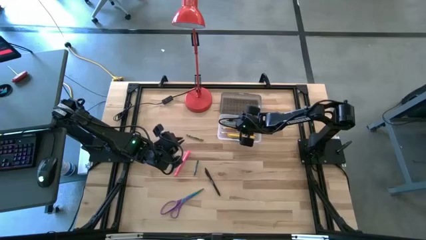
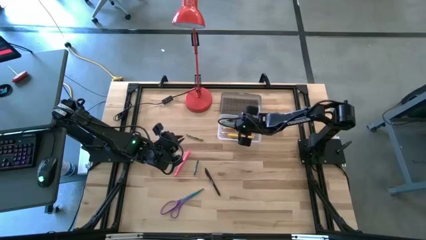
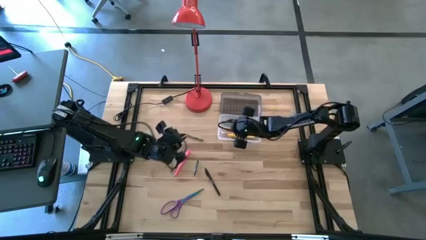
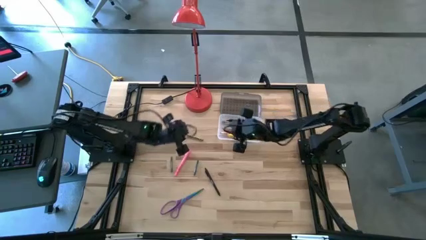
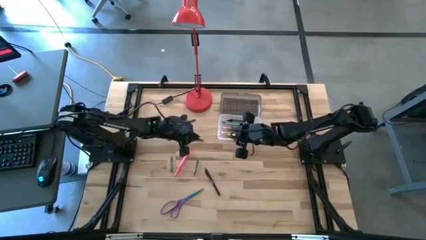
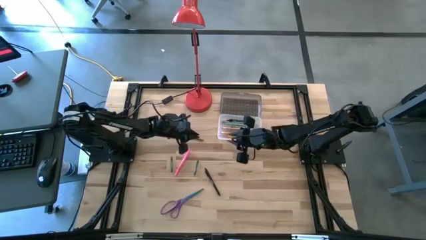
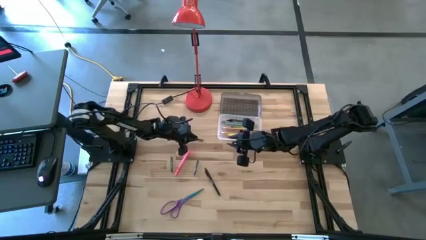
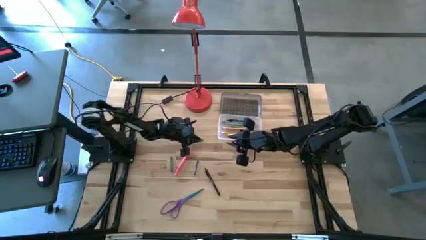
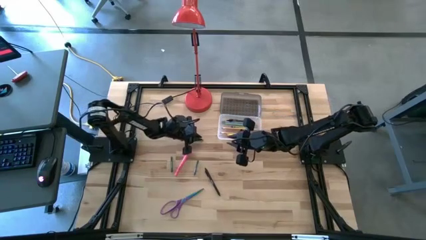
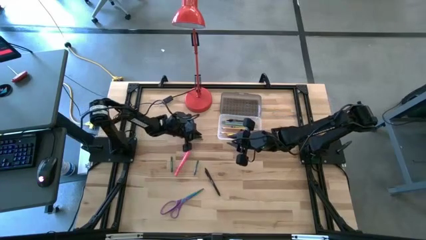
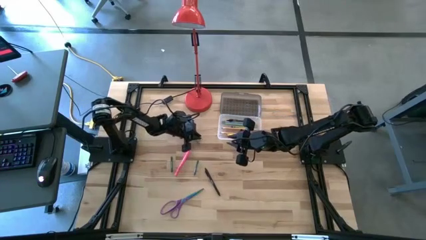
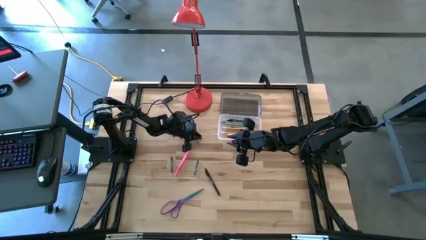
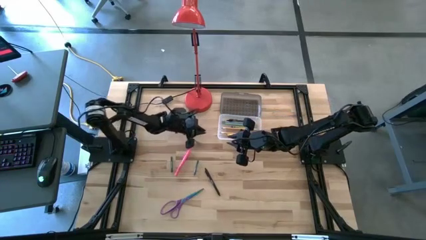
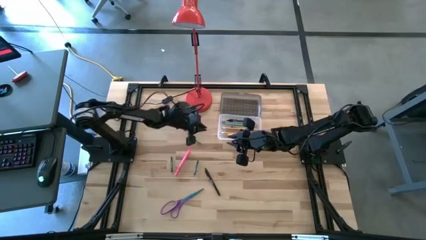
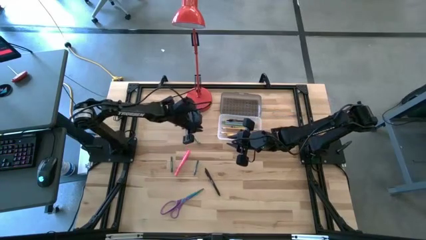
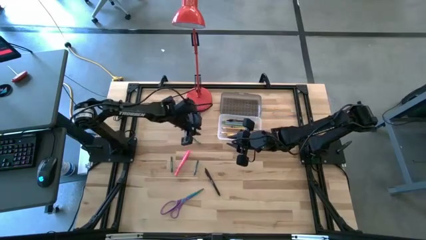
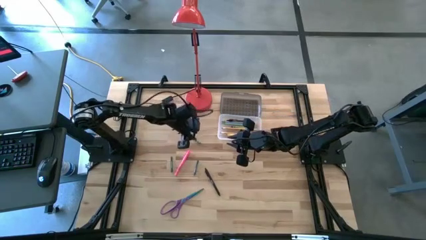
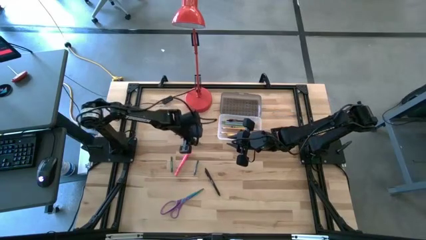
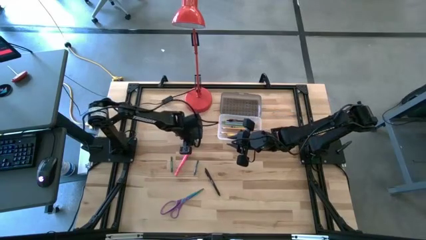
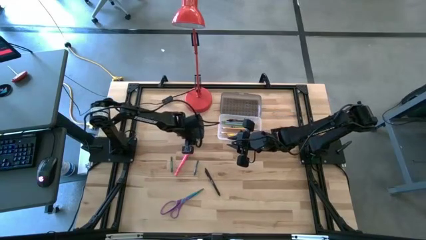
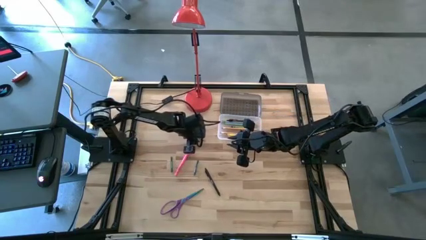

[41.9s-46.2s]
Task: Pick & place school supplies into a supply box
Put the green crayon into the black supply box

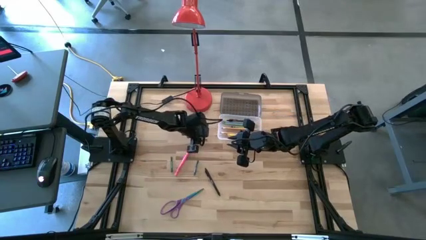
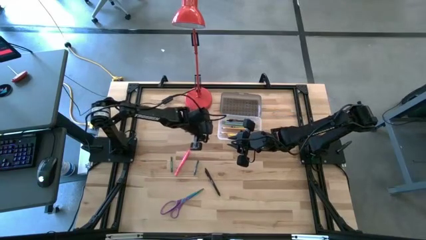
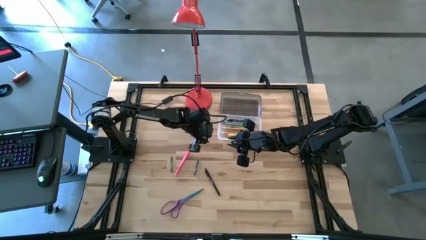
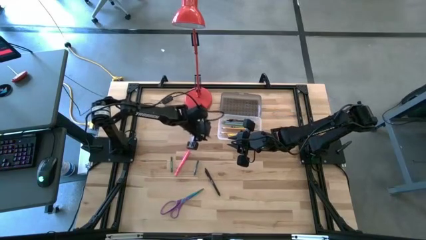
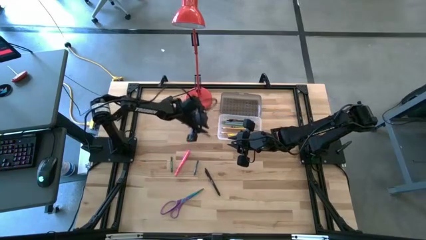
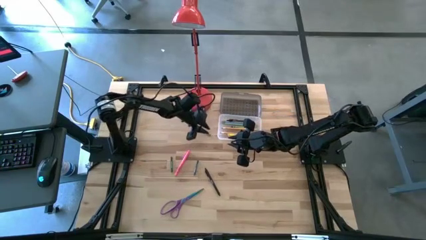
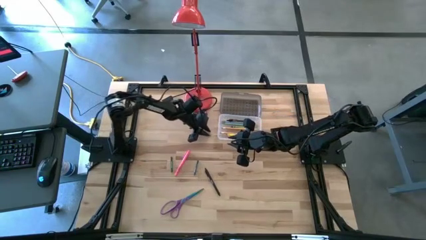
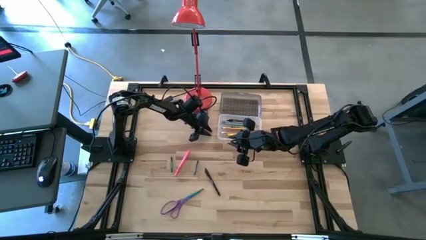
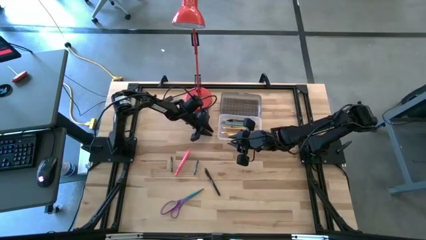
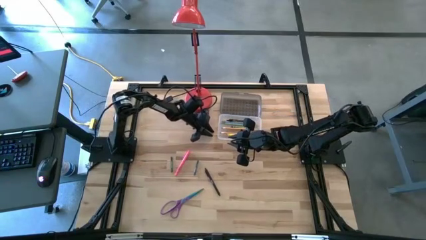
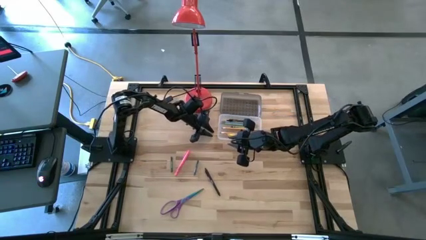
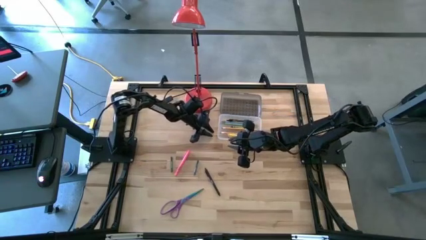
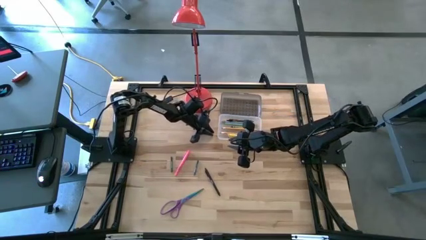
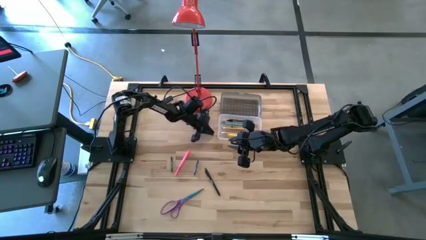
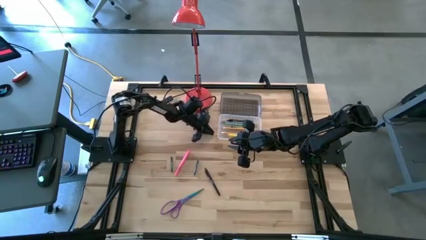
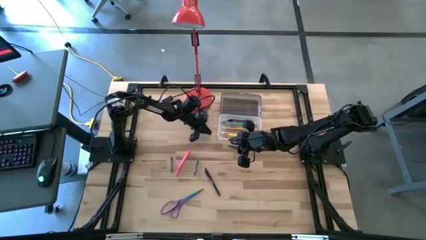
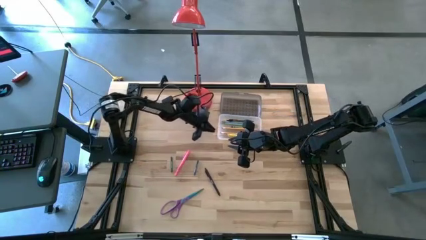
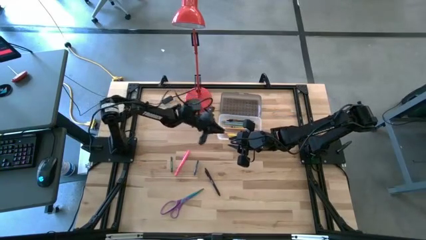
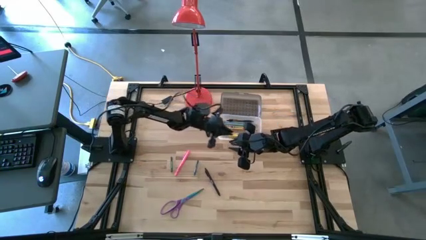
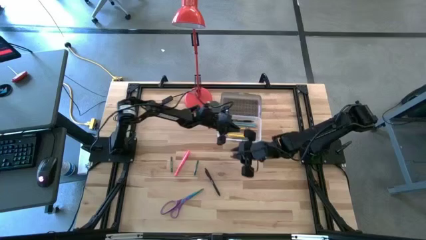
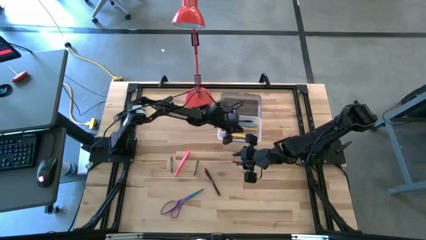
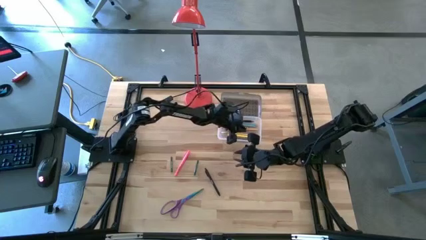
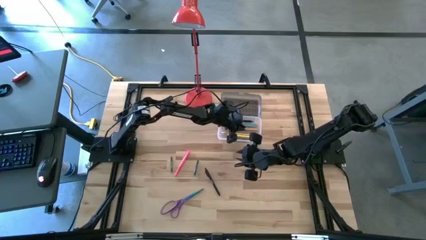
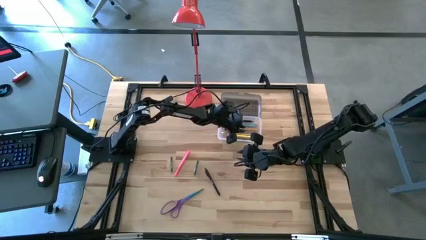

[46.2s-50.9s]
Put the green crayon into the black supply box

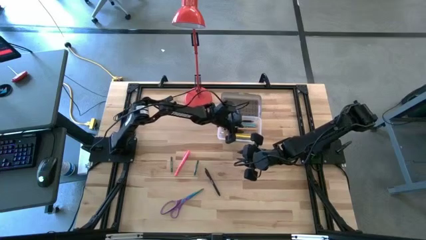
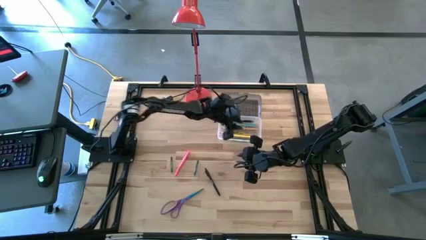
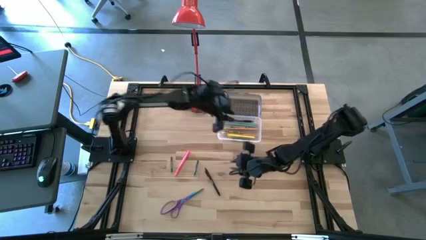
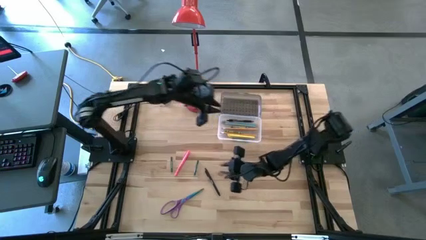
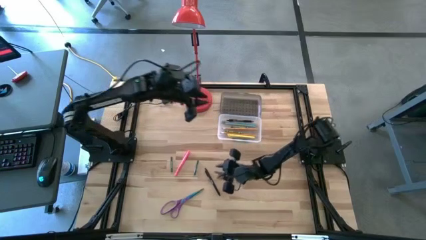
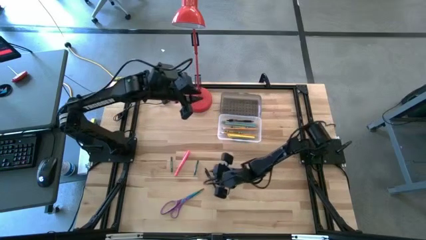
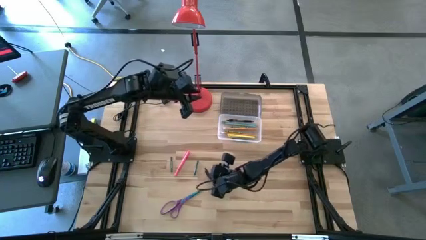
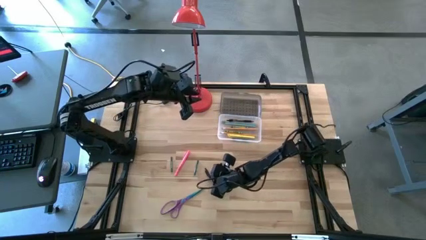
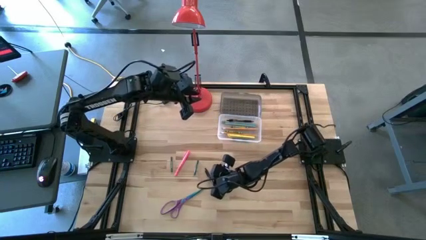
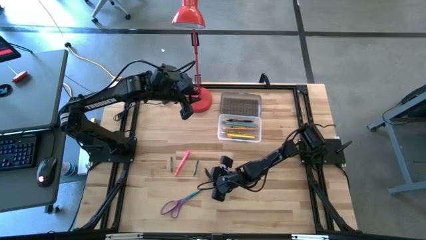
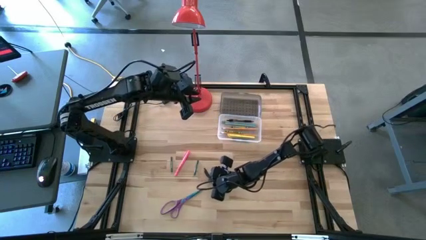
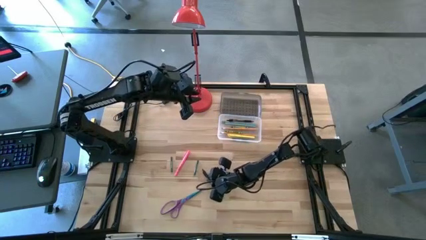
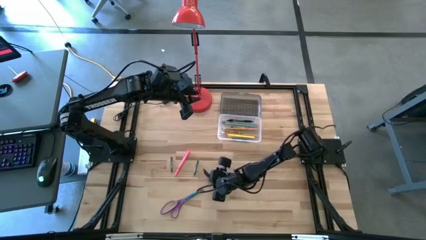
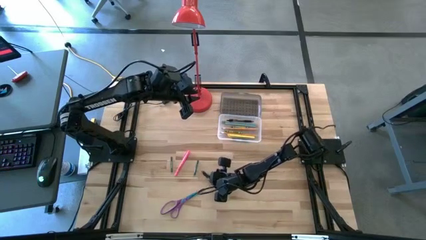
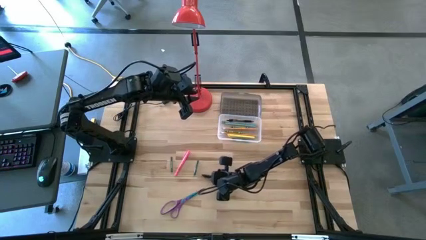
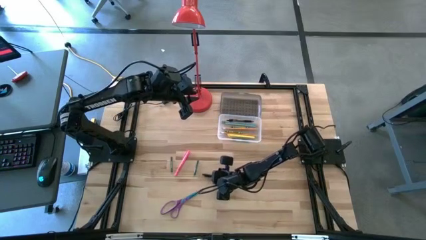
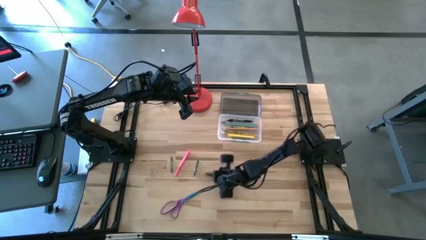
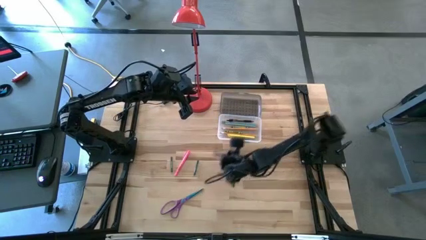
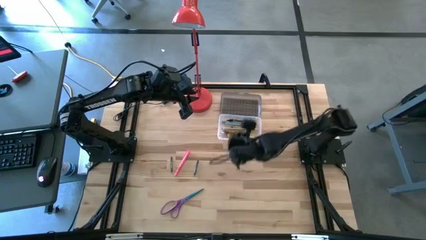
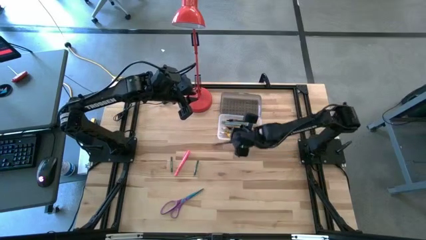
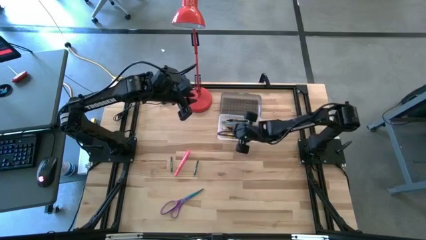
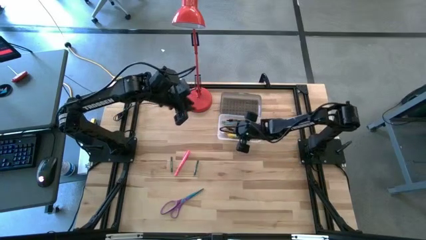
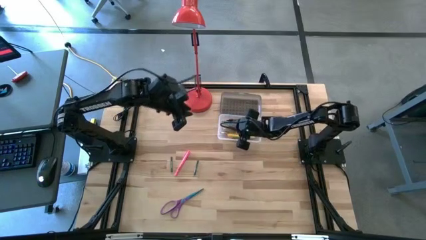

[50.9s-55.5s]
Put the black pen into the black supply box

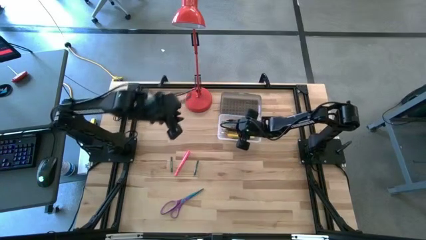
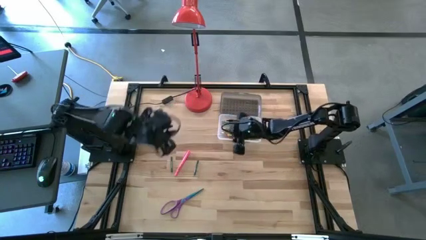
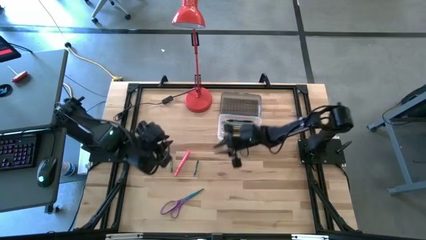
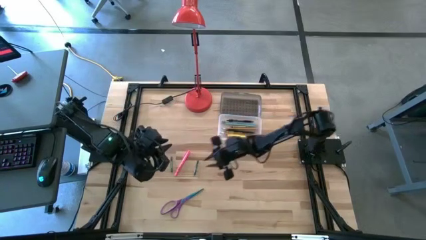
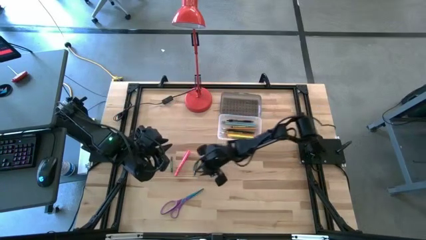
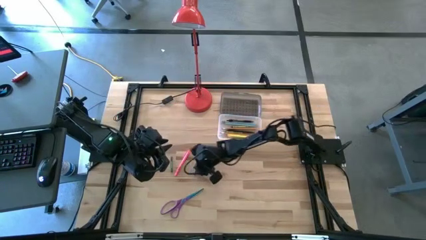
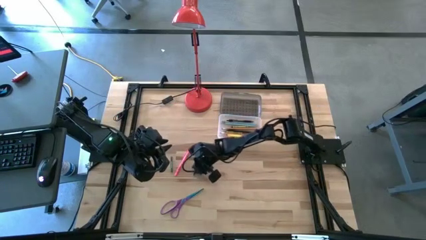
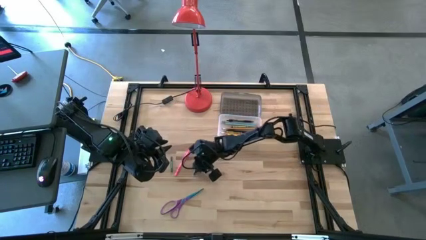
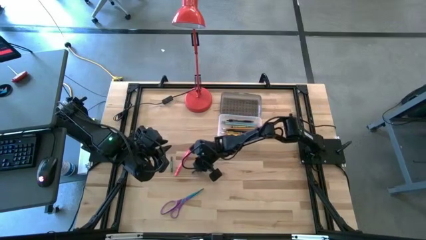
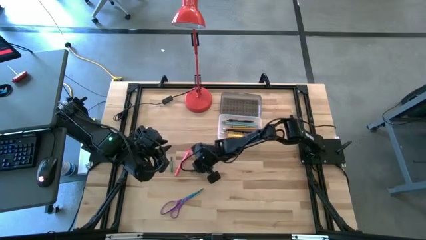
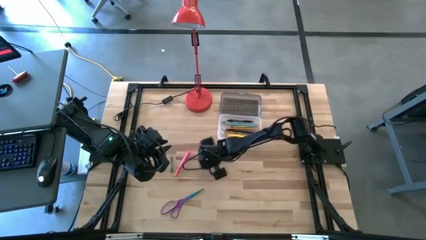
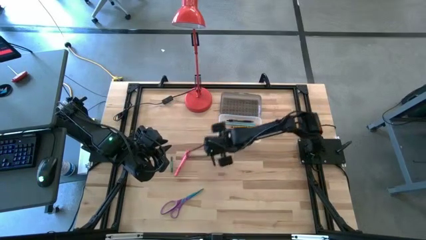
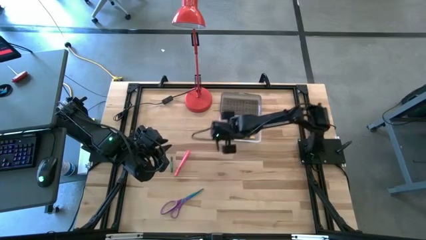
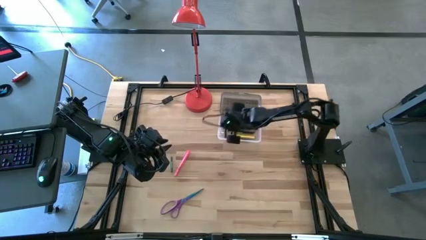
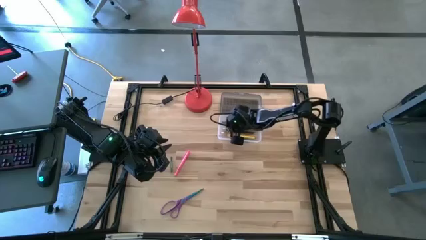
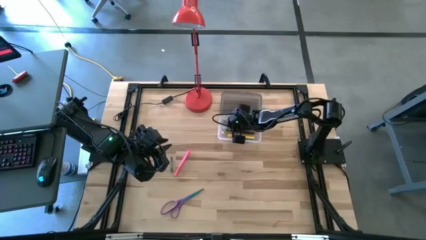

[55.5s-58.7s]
Put the right dark green crayon into the black supply box
